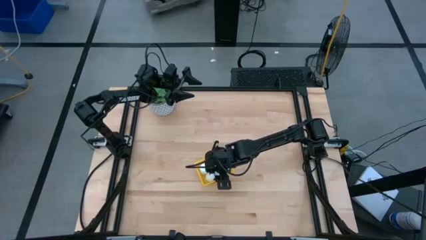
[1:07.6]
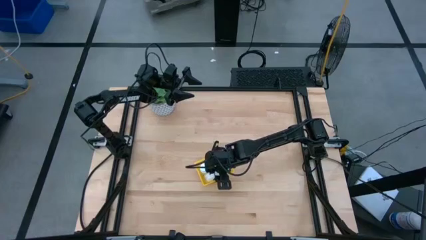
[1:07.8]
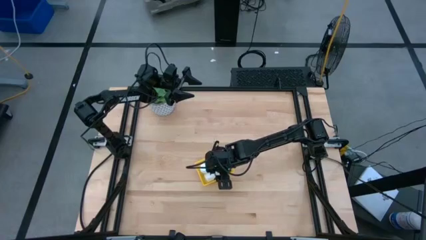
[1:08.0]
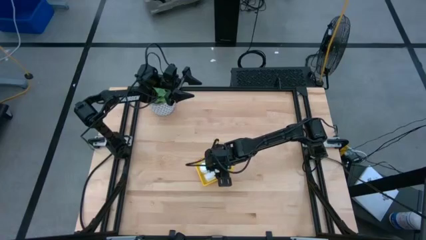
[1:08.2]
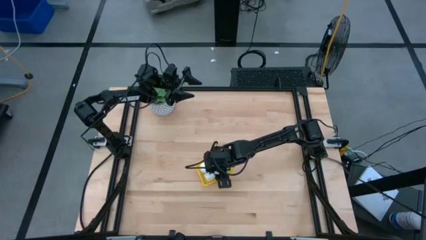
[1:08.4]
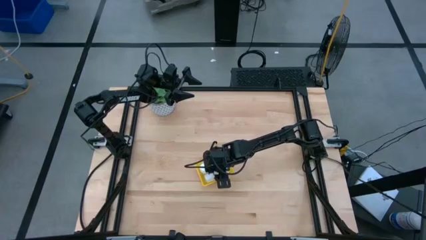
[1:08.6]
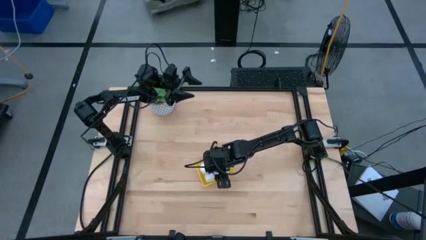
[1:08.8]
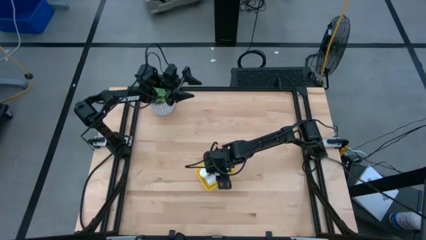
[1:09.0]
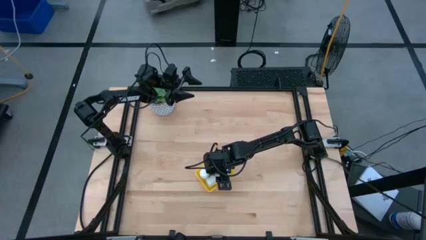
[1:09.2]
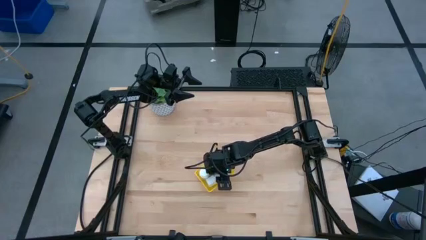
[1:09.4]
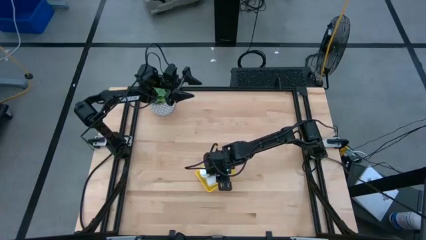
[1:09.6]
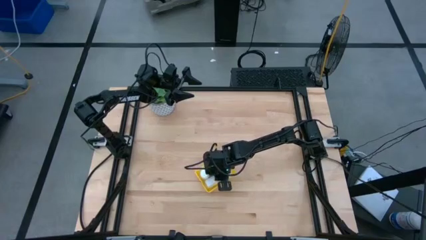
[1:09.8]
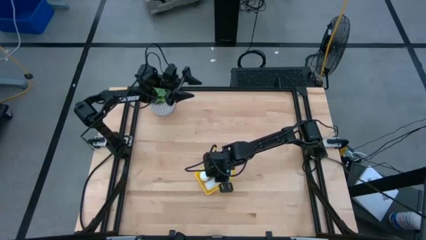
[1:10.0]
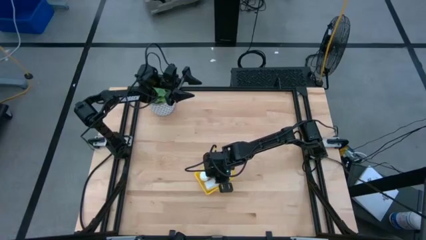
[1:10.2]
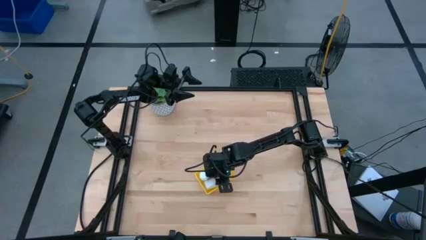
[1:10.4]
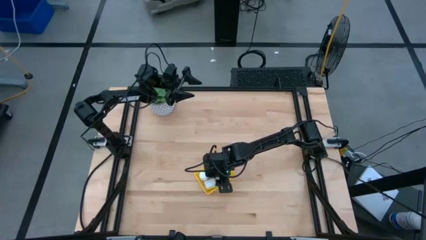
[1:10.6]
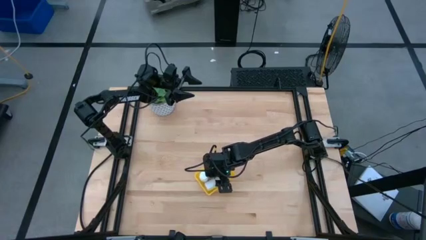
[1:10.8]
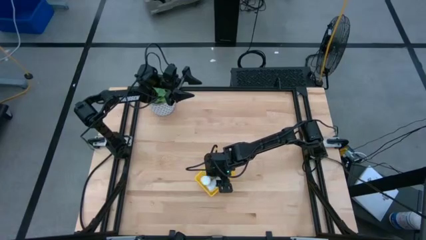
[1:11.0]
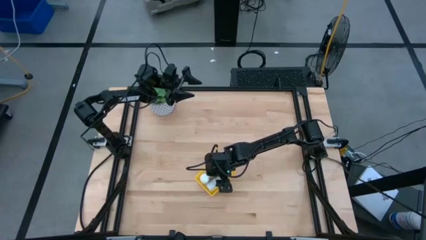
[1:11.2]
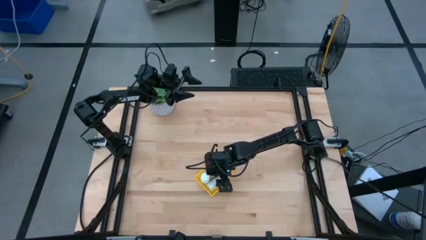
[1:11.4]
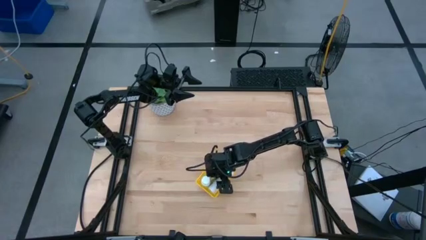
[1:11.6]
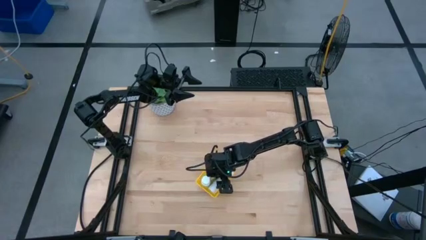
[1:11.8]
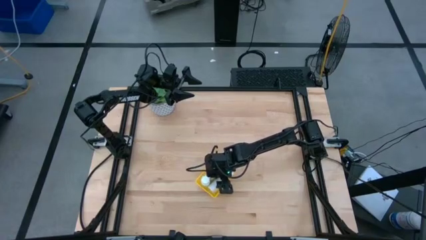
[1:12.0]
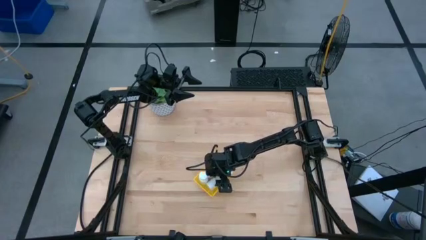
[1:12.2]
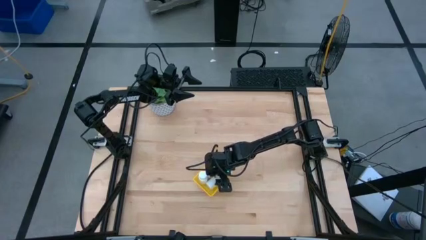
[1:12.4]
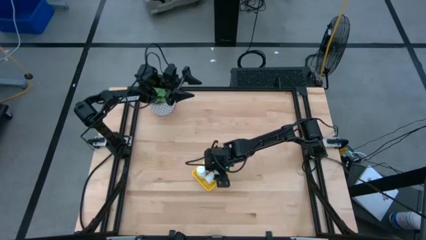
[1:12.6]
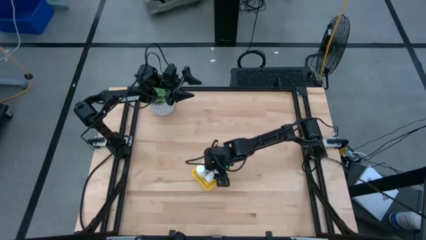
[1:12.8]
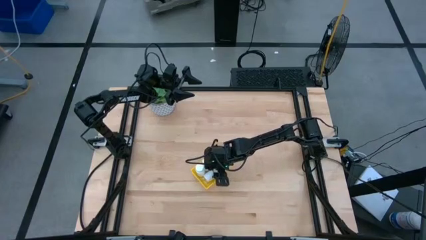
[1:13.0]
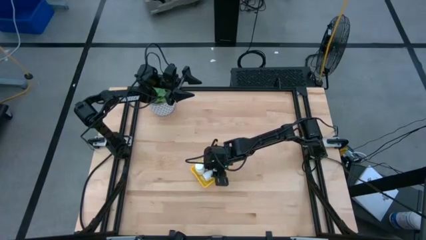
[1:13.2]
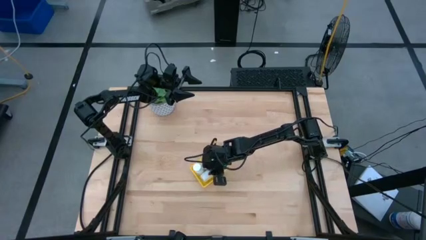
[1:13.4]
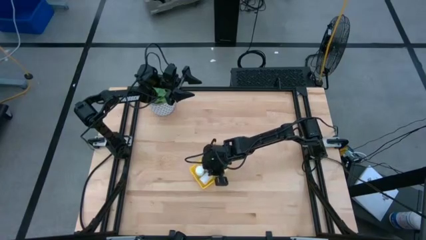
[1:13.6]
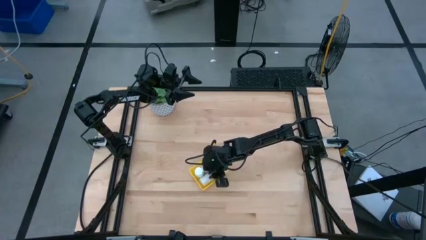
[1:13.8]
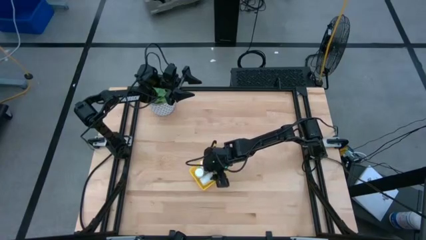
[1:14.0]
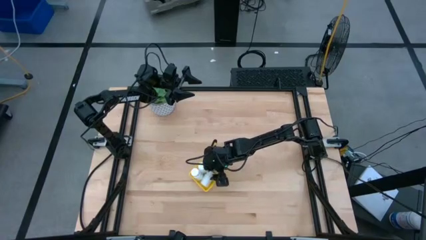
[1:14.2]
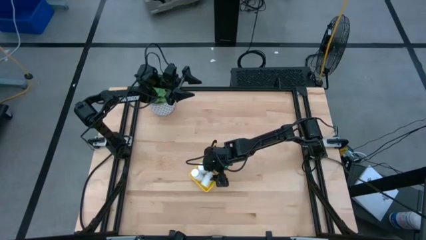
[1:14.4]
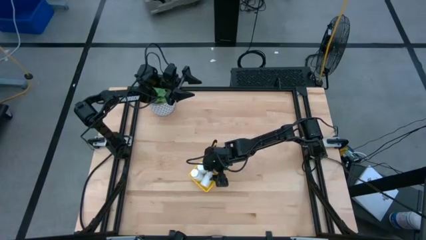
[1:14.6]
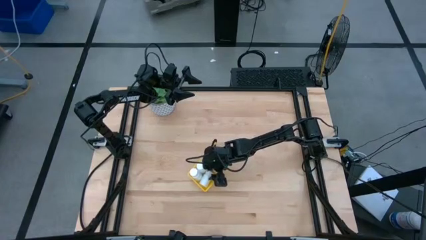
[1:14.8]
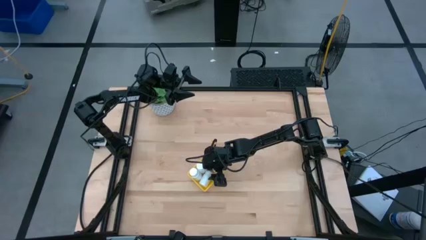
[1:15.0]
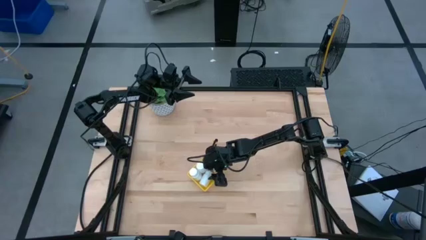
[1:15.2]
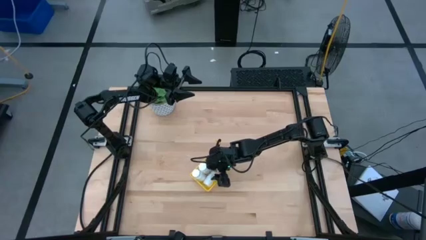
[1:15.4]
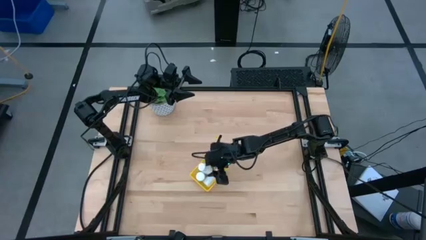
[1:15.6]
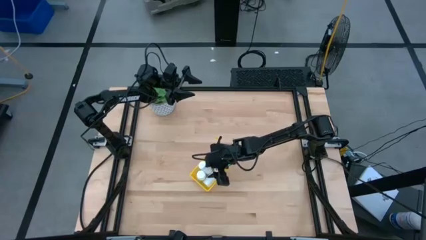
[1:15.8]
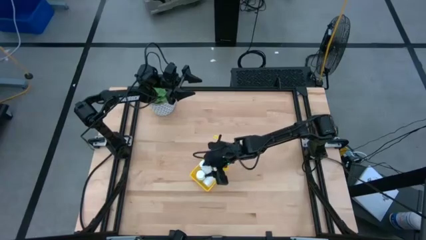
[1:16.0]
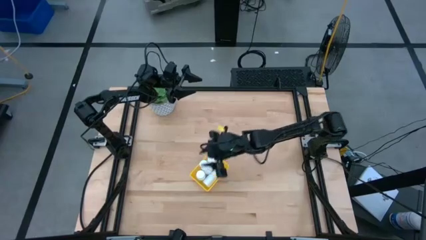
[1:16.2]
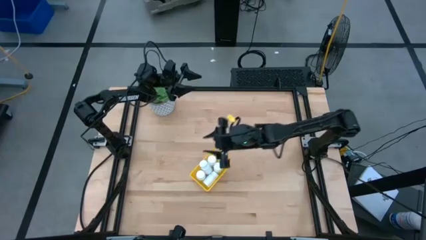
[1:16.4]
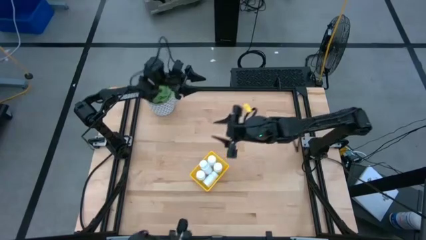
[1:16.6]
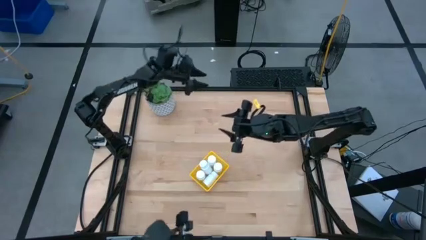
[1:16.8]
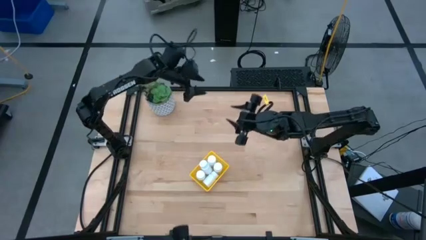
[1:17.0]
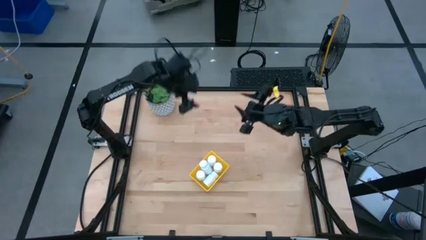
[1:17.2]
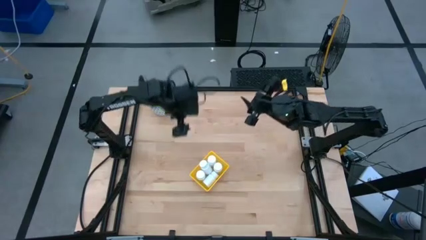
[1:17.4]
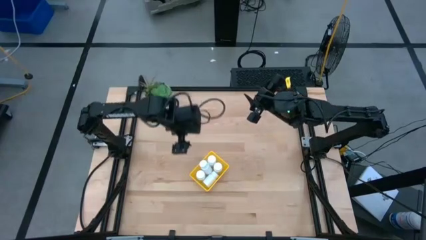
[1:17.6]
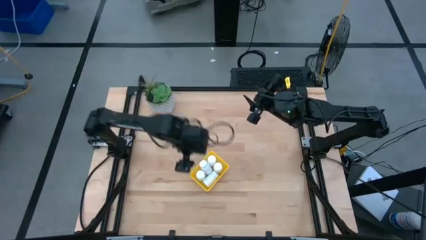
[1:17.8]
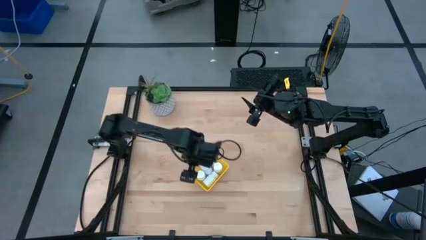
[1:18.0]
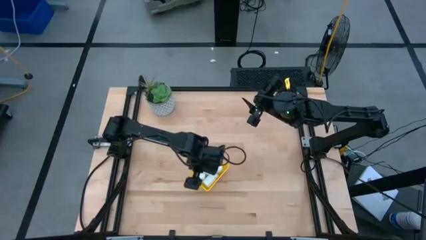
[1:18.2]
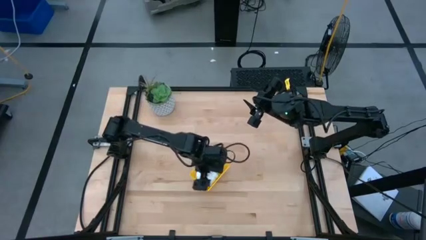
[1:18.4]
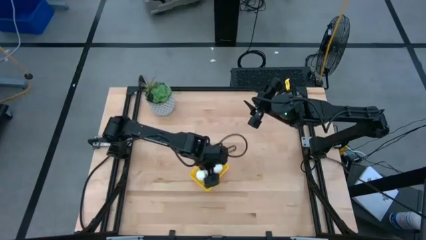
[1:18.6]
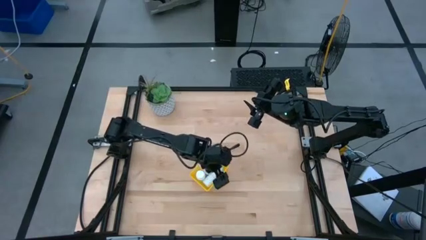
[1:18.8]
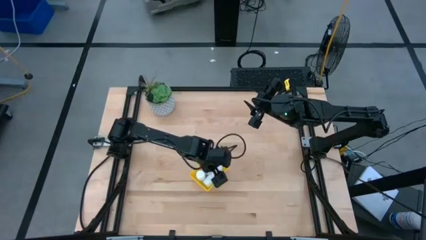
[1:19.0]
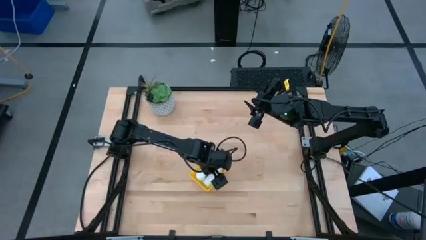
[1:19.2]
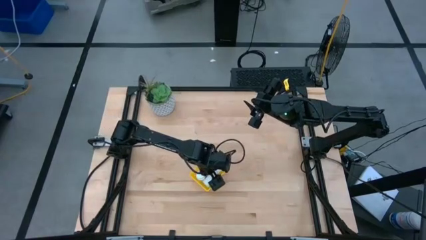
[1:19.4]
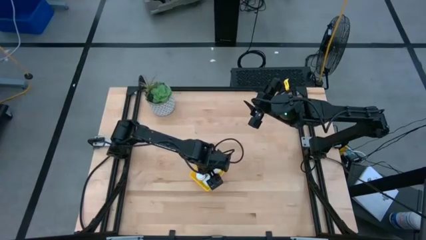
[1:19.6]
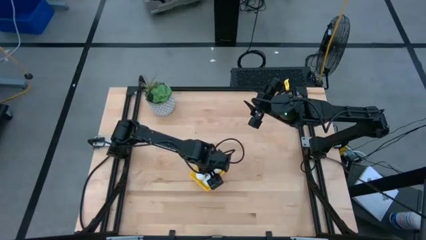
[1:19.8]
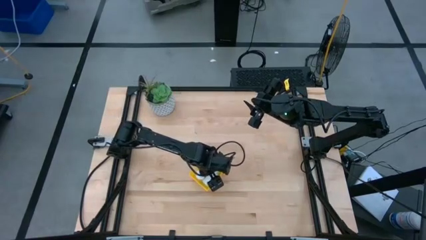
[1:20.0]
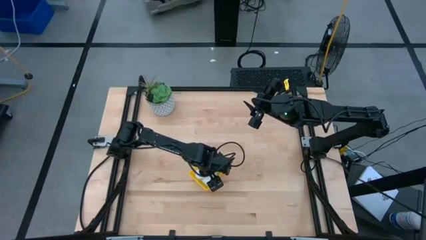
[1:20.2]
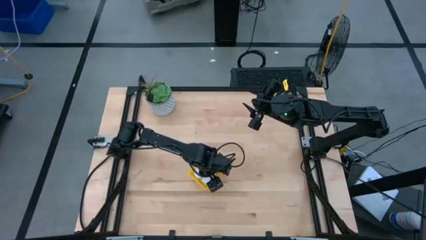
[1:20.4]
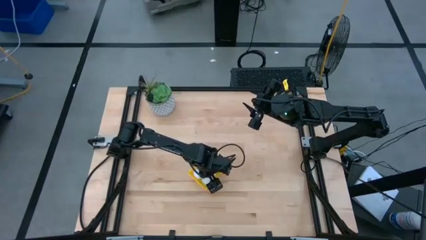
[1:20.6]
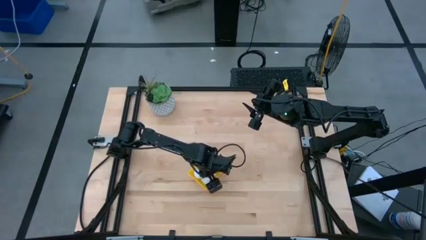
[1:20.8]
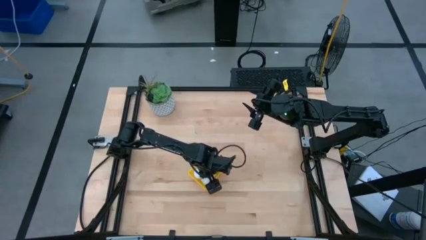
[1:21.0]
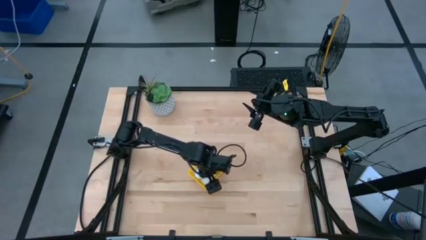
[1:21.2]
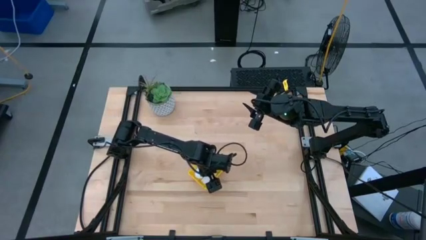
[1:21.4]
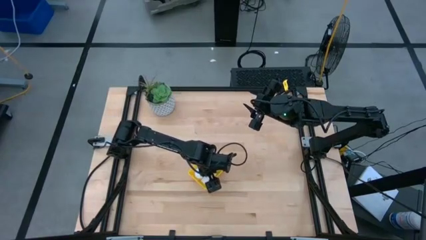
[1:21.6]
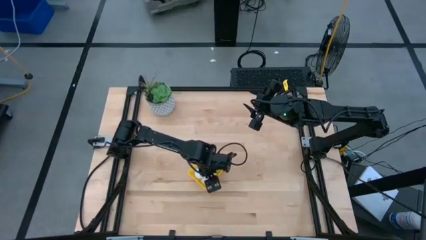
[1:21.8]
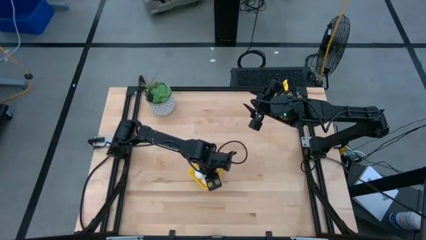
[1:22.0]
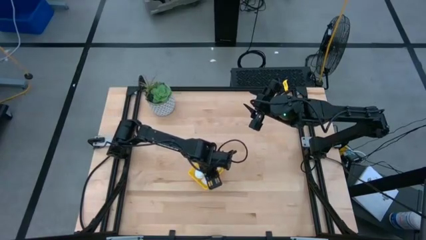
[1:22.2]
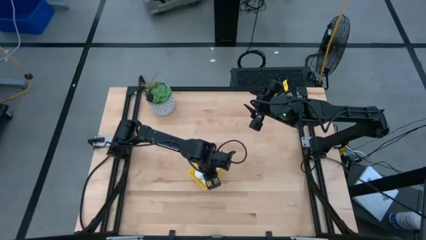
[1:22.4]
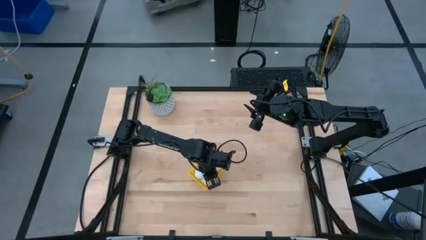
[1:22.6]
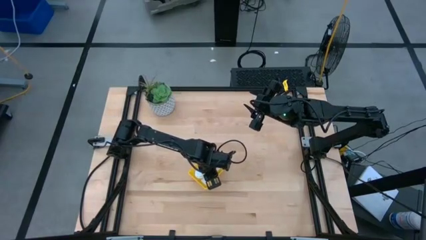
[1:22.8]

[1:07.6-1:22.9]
Task: Pick and place pill bottles into a basket
Adjust the white medicine bottle in the yellow bin
